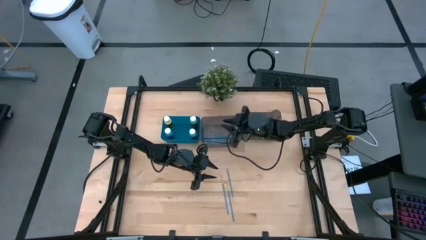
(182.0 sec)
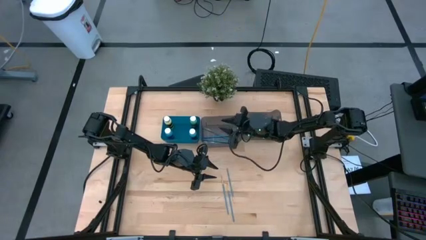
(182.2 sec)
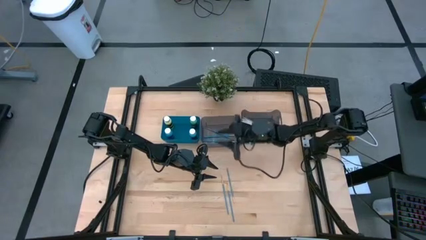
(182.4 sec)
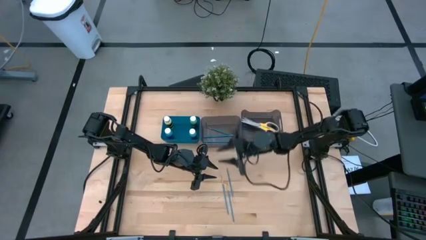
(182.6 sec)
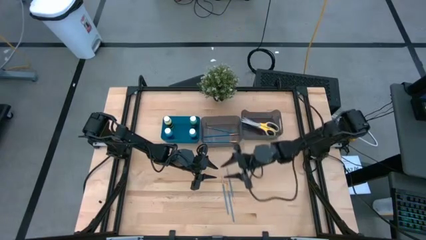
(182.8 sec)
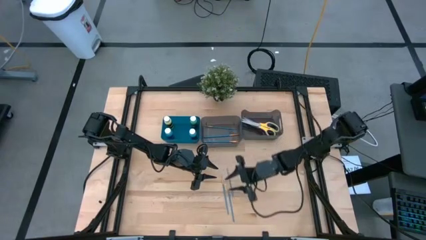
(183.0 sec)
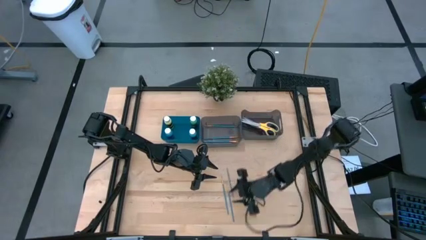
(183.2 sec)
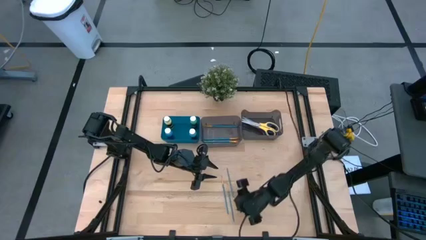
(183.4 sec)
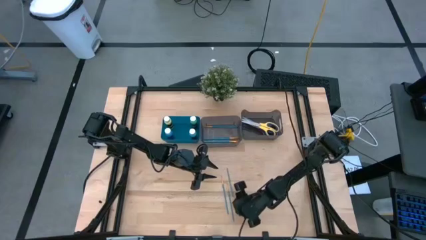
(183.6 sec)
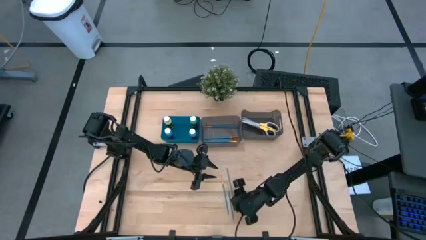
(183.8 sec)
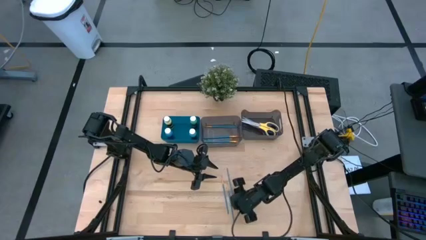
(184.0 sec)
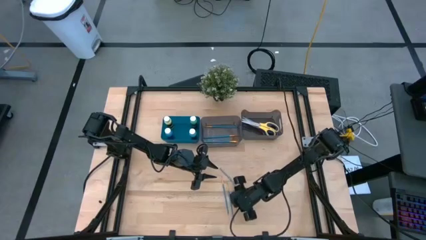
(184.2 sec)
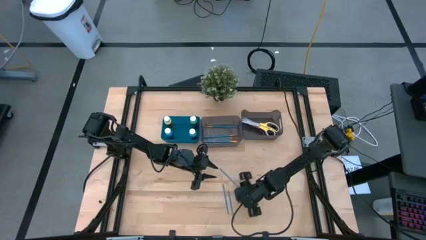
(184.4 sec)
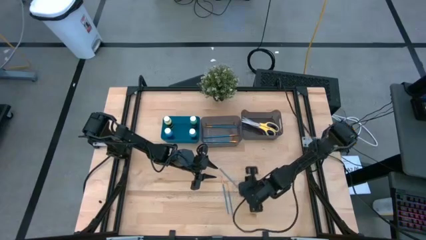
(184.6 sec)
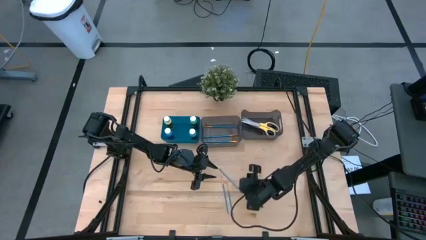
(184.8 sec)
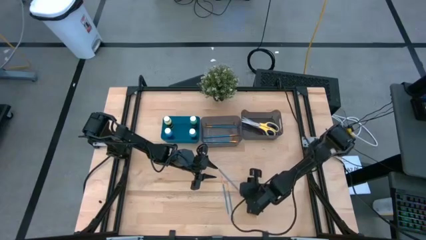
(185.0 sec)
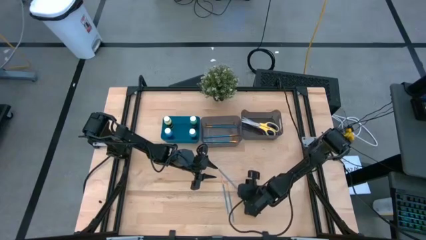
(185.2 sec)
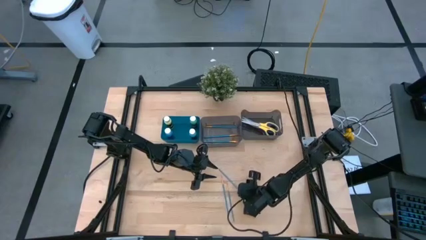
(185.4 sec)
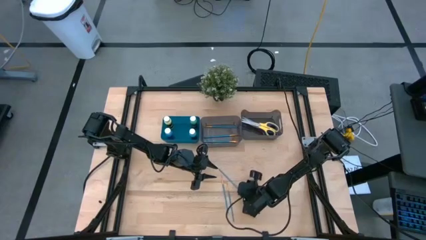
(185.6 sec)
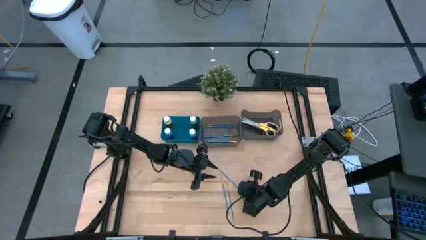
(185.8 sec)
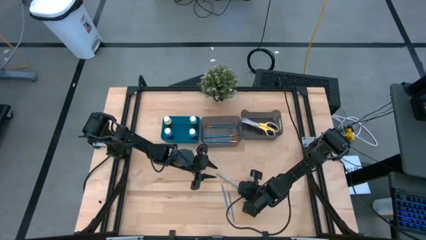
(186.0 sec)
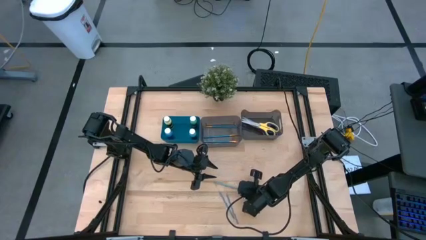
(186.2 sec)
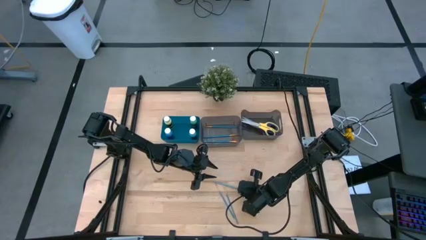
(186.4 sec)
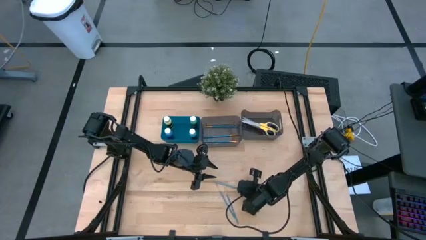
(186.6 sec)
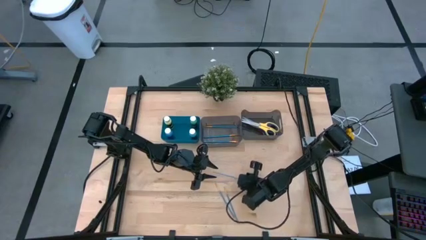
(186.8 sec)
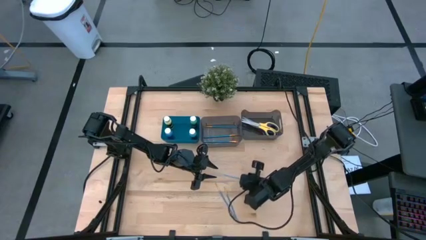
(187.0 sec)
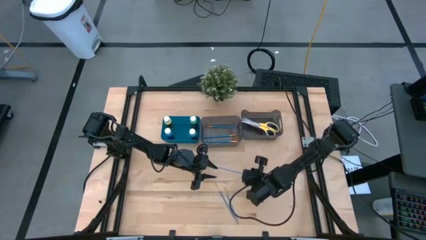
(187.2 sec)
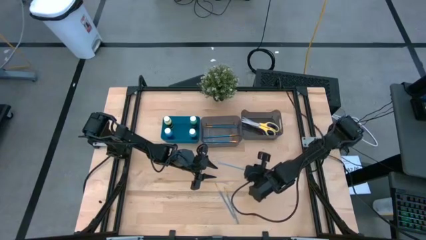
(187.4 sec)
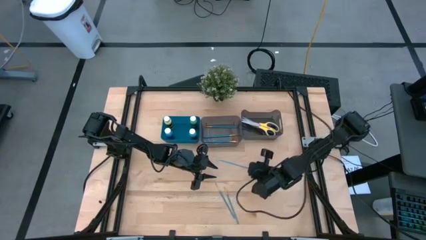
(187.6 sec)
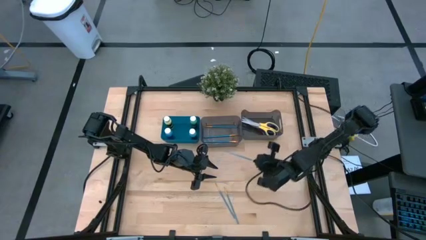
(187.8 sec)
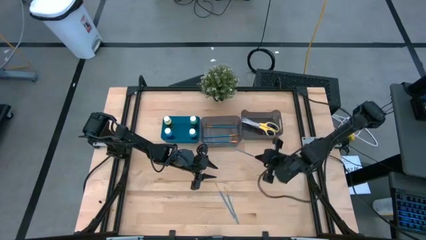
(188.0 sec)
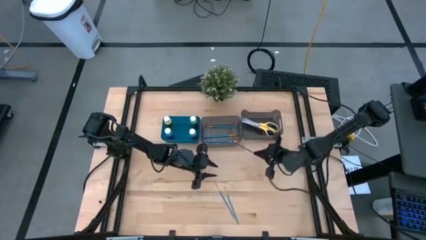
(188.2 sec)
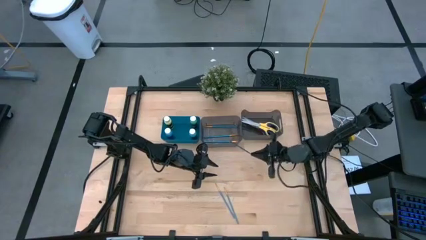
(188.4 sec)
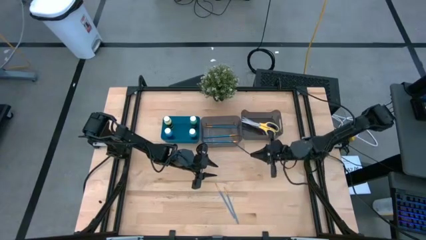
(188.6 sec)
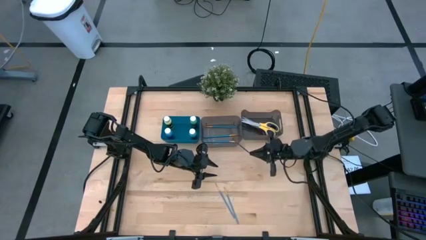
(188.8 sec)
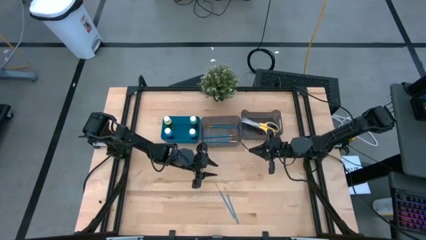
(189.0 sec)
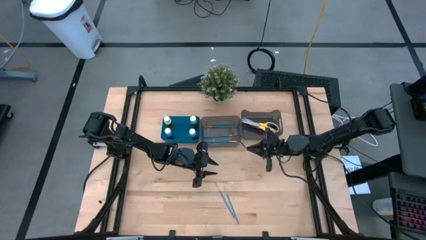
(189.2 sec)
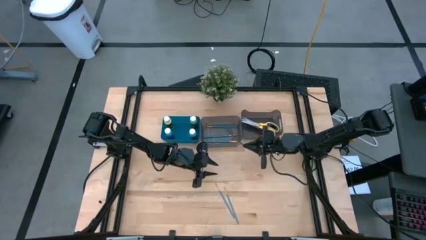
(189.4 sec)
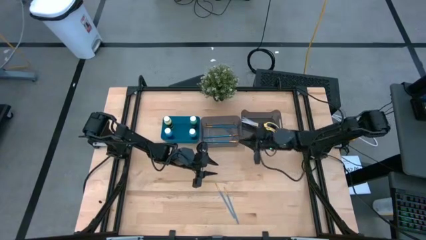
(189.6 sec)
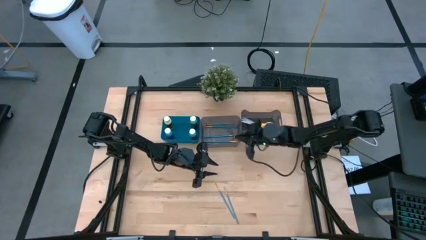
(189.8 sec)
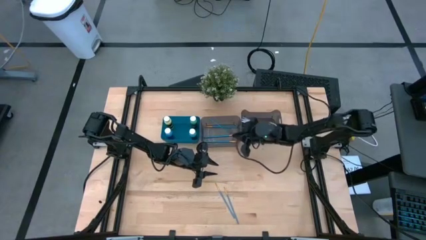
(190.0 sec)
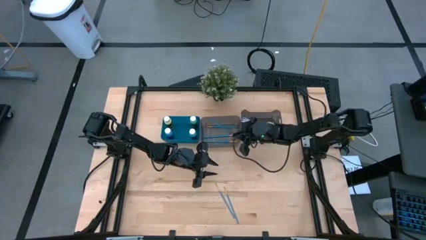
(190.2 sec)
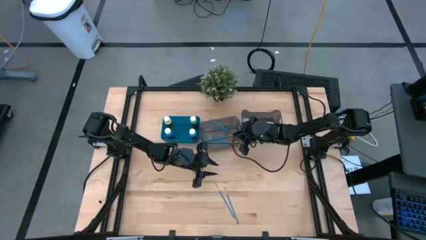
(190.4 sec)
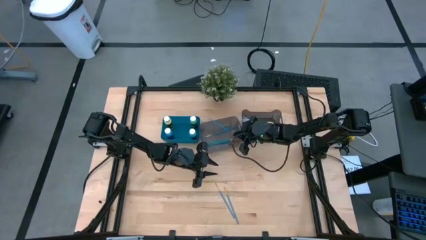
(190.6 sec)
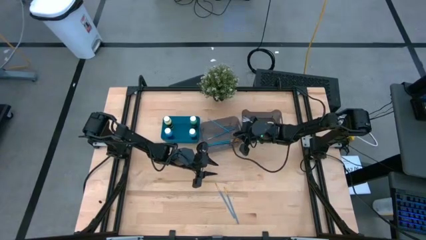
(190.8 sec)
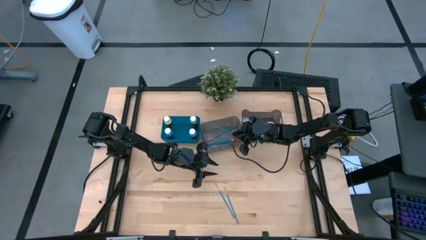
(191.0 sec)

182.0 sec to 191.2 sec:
Task: Pick & Place Paint Supplies
Put the paint brush into the left black bin

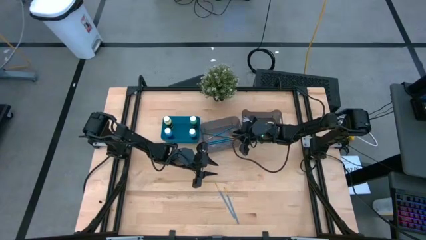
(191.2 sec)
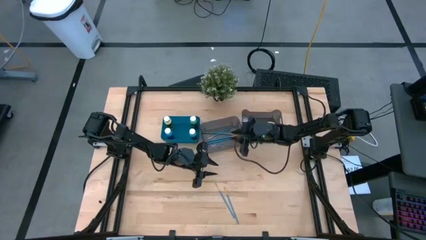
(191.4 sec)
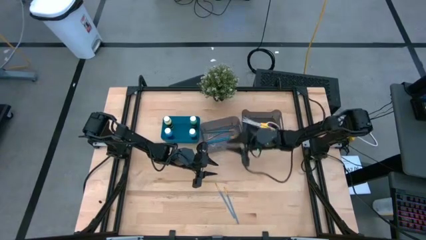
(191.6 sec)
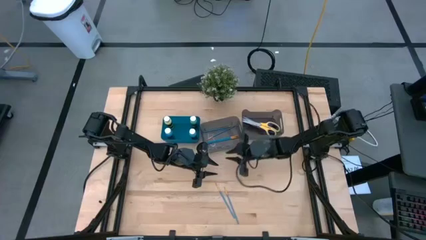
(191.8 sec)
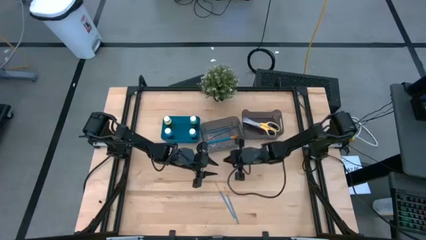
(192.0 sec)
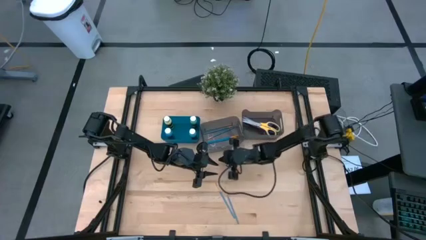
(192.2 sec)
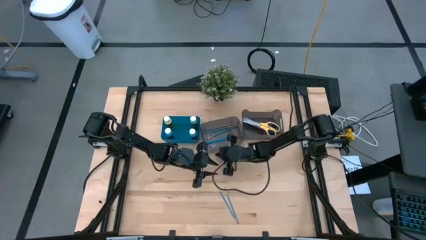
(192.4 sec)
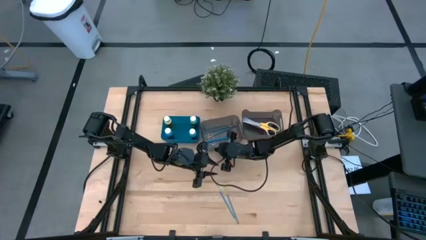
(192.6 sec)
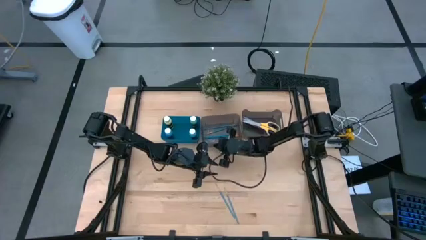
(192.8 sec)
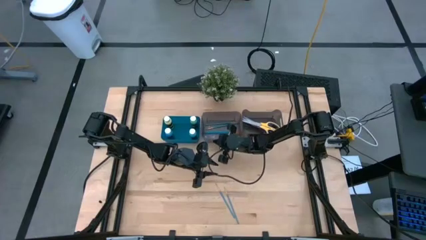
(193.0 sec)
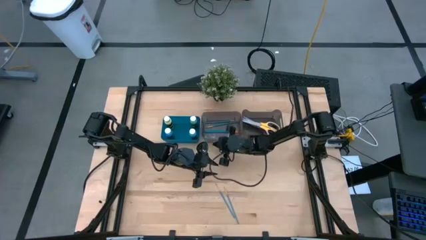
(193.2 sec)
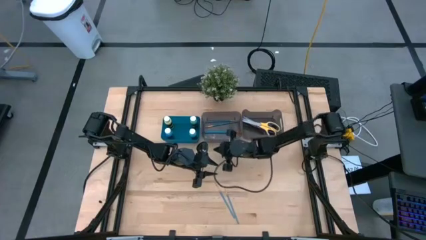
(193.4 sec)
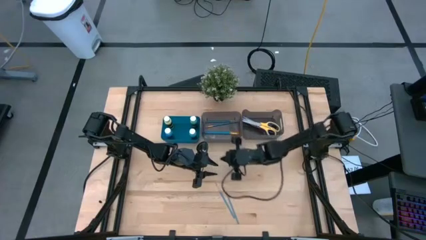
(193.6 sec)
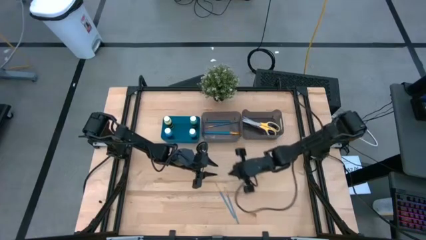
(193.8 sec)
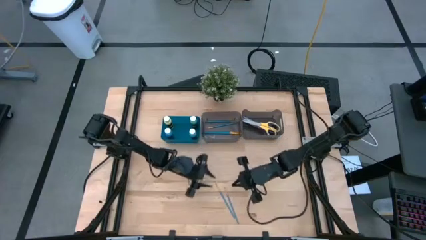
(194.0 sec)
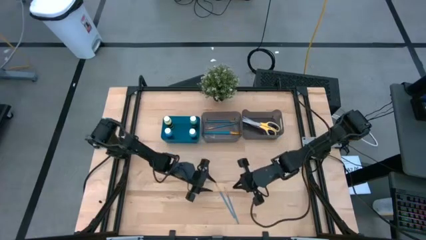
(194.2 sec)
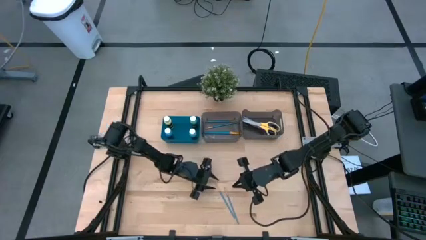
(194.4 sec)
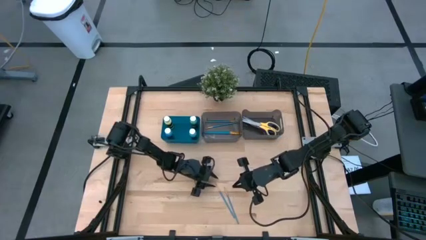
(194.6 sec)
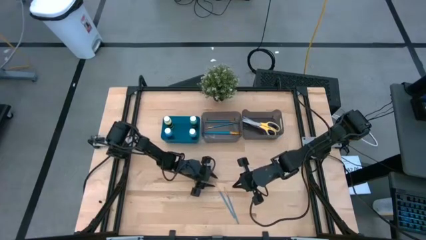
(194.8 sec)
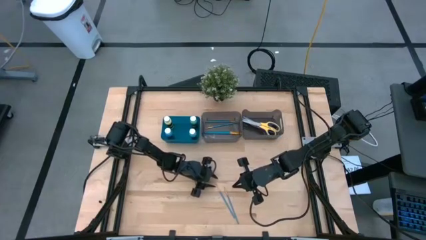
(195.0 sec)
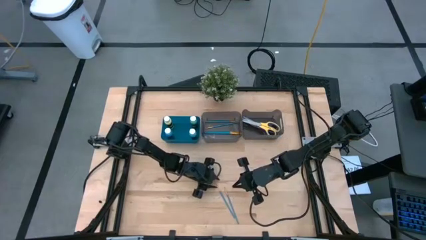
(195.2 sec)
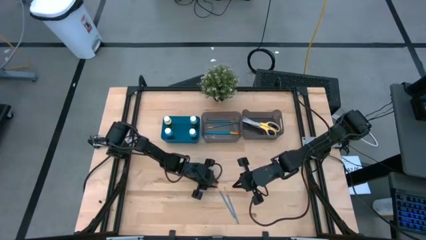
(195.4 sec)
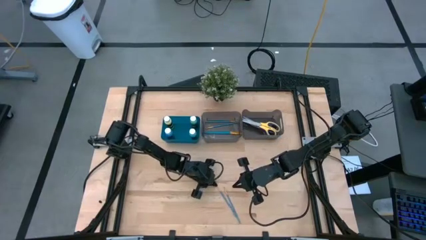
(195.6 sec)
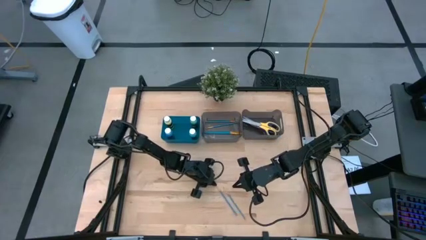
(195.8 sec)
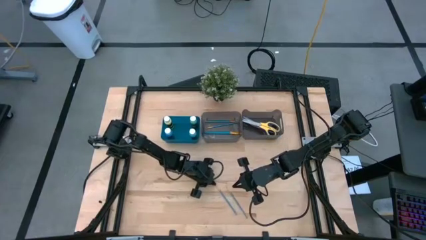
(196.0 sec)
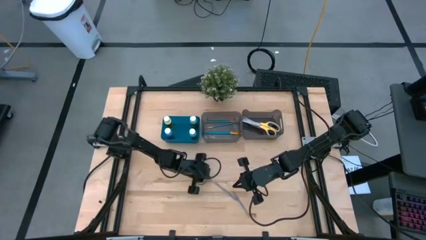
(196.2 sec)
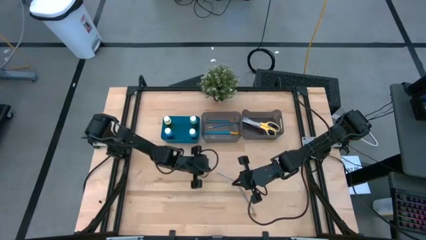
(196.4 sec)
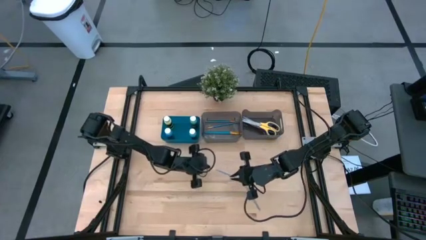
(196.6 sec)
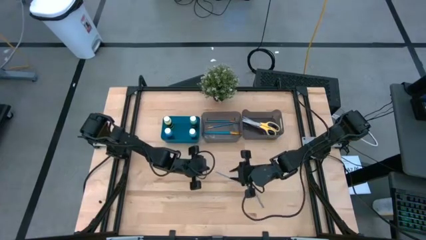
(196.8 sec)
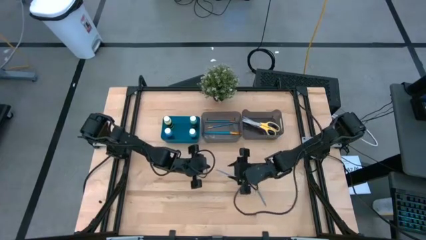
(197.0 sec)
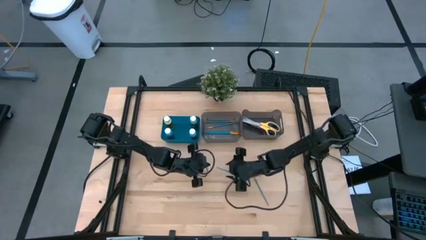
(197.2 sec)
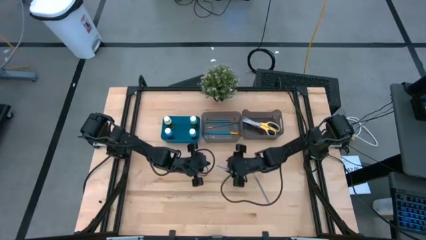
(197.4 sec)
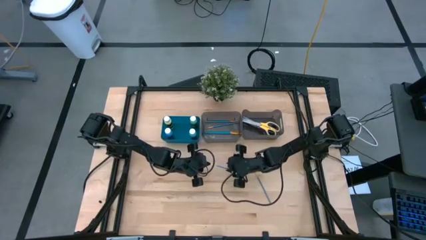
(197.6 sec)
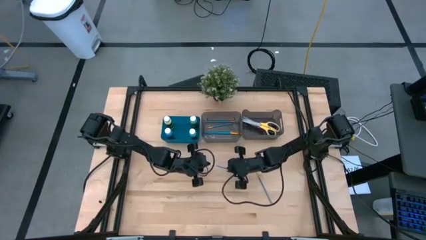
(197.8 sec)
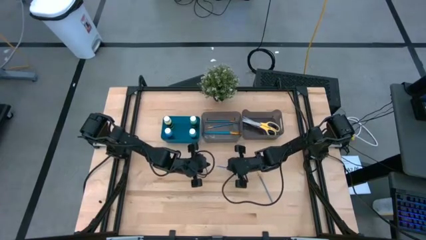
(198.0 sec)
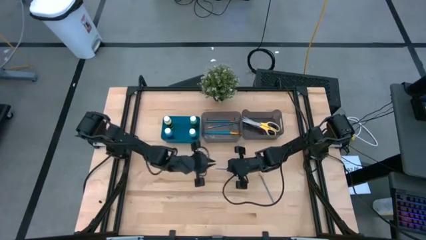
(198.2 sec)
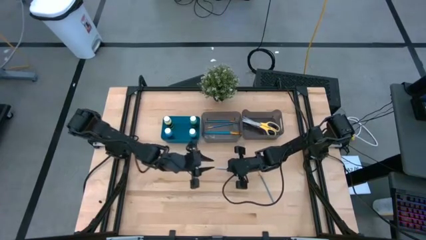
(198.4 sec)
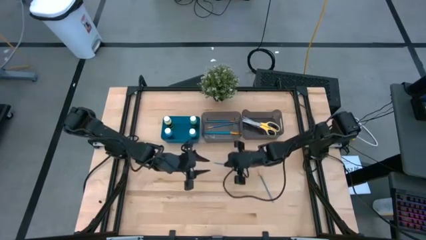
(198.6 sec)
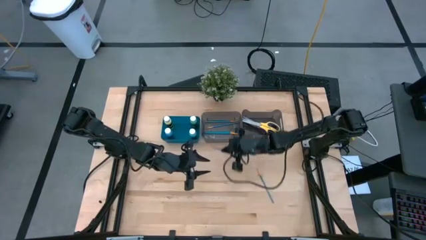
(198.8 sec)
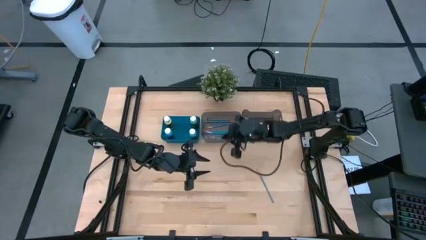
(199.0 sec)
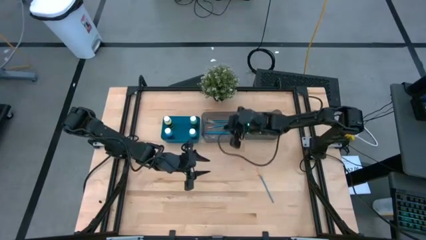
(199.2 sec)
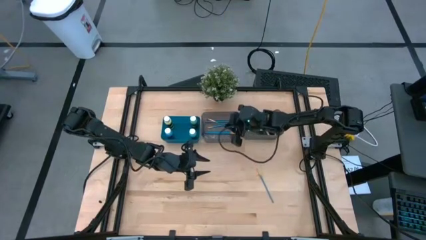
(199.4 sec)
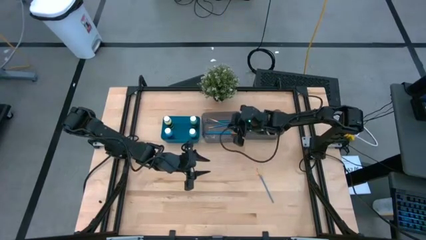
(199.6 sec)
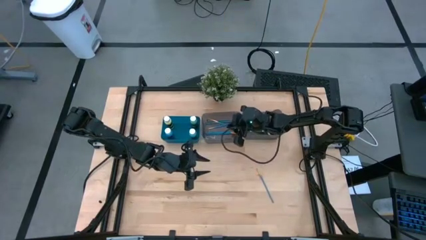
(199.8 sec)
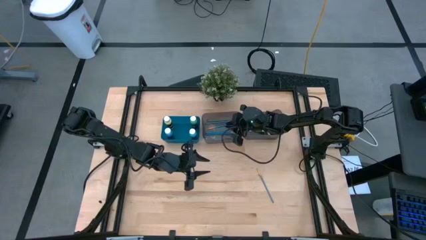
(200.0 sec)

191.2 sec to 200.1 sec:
Put the paint brush into the left black bin
